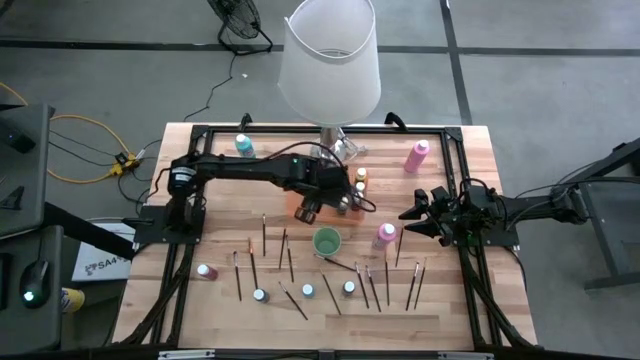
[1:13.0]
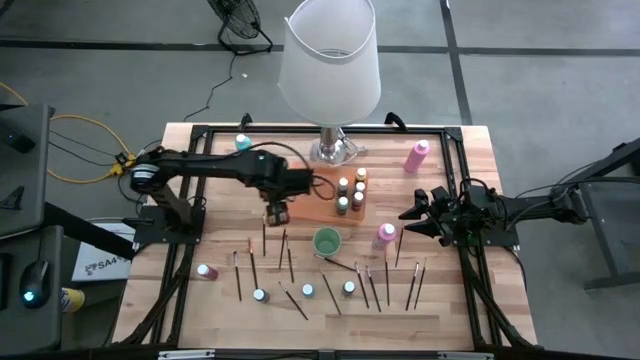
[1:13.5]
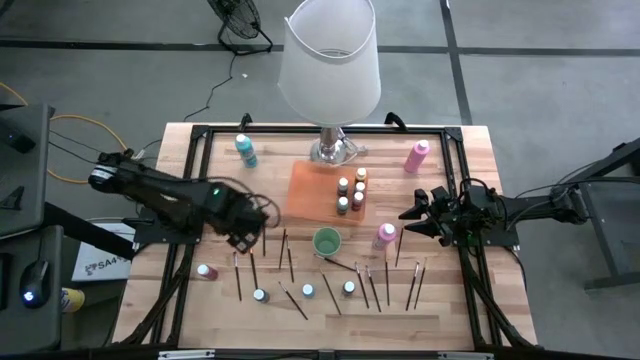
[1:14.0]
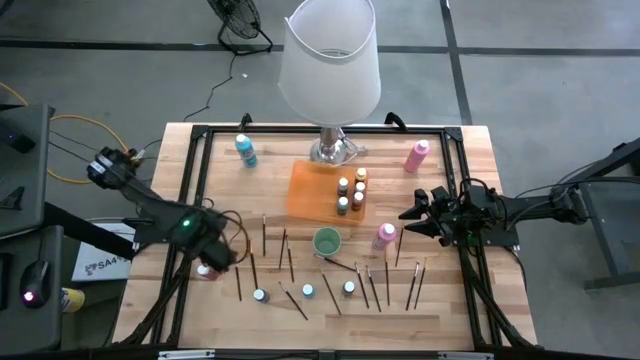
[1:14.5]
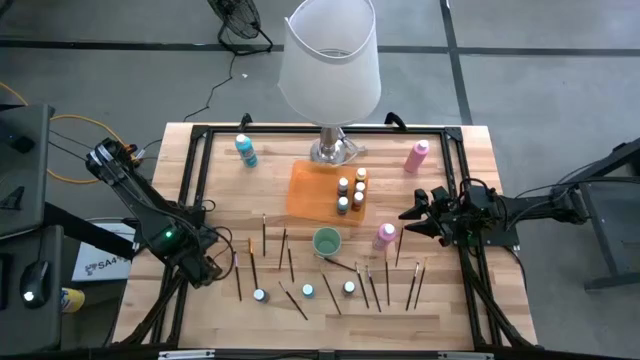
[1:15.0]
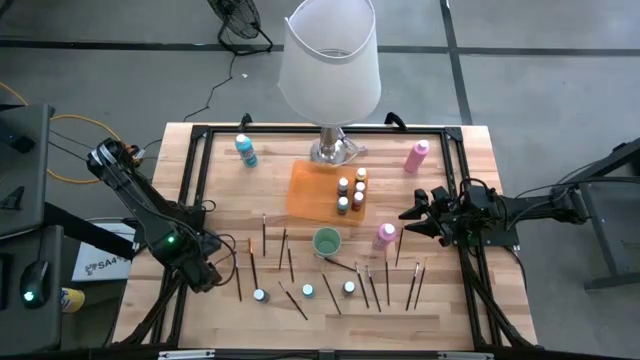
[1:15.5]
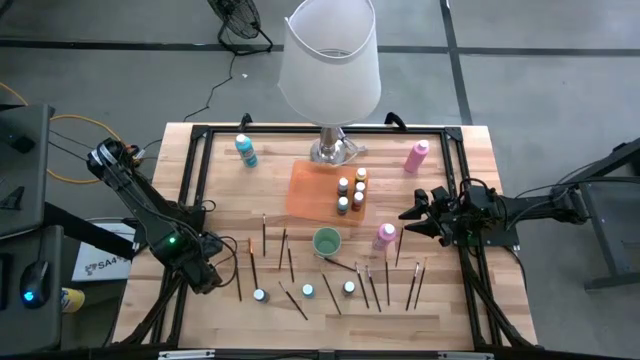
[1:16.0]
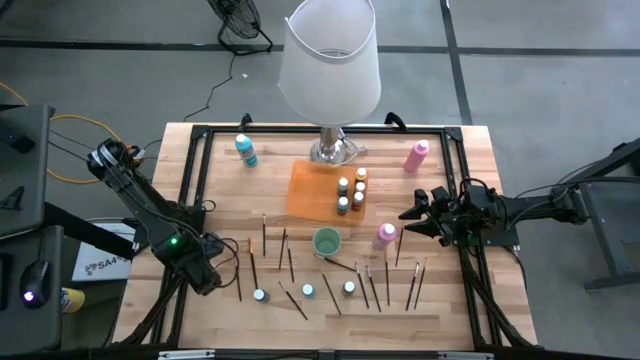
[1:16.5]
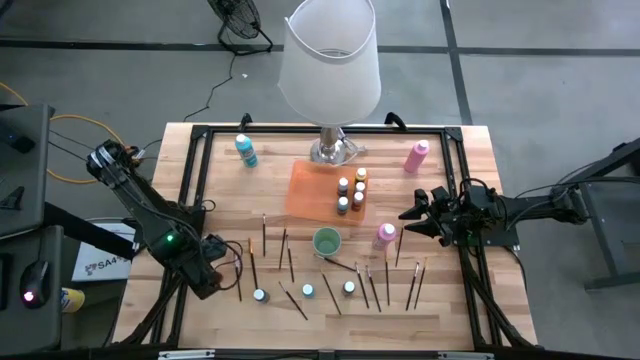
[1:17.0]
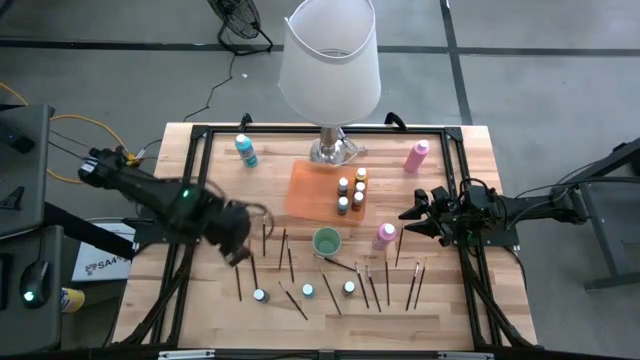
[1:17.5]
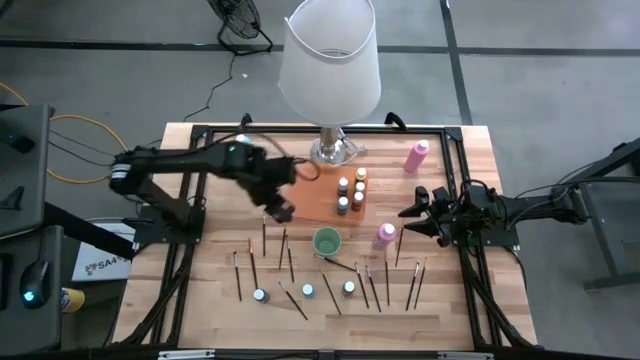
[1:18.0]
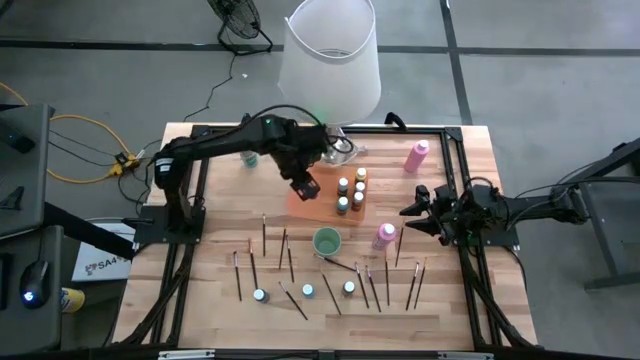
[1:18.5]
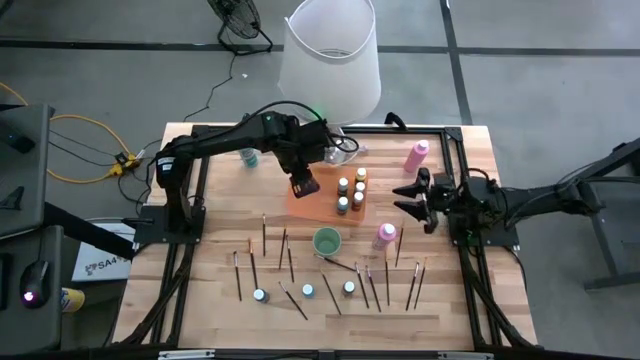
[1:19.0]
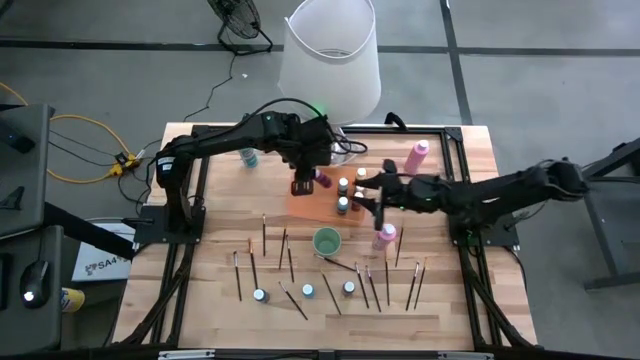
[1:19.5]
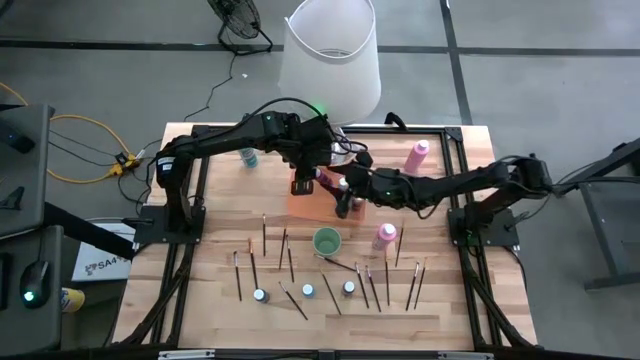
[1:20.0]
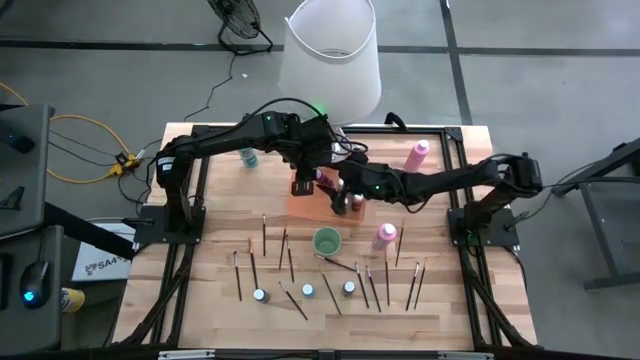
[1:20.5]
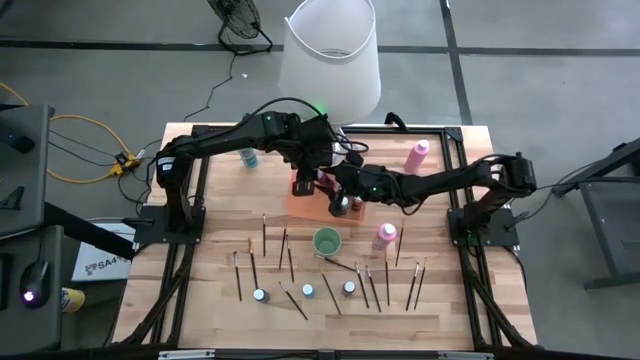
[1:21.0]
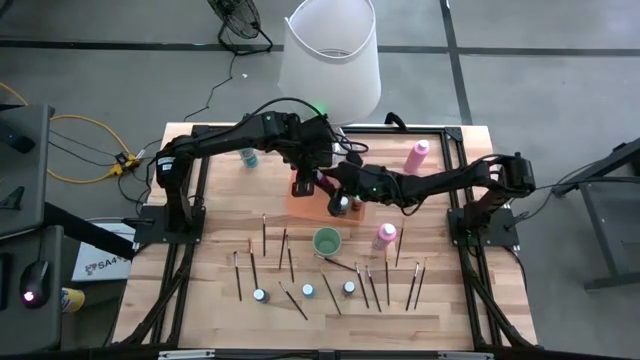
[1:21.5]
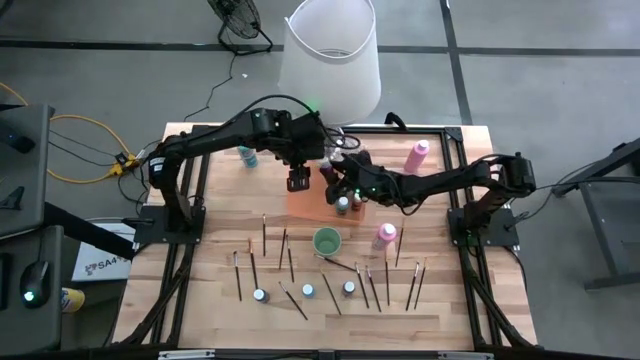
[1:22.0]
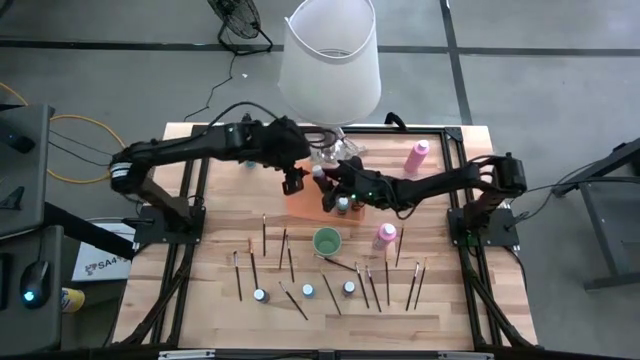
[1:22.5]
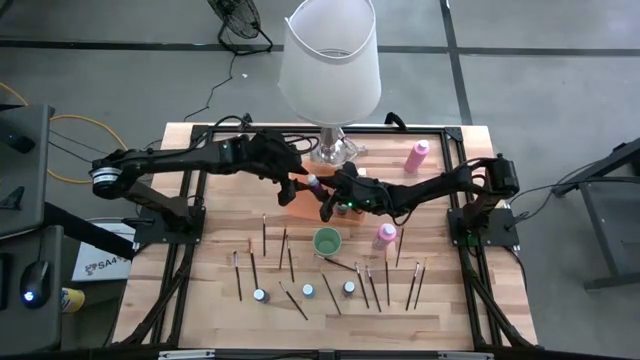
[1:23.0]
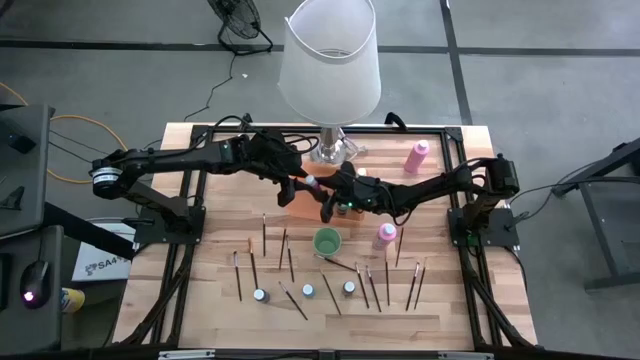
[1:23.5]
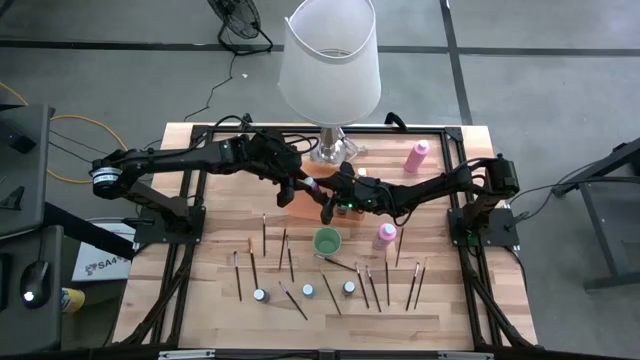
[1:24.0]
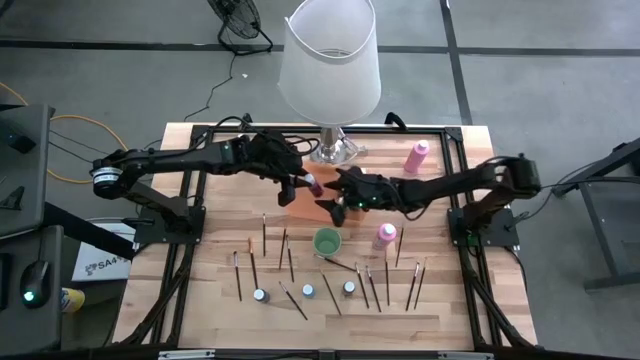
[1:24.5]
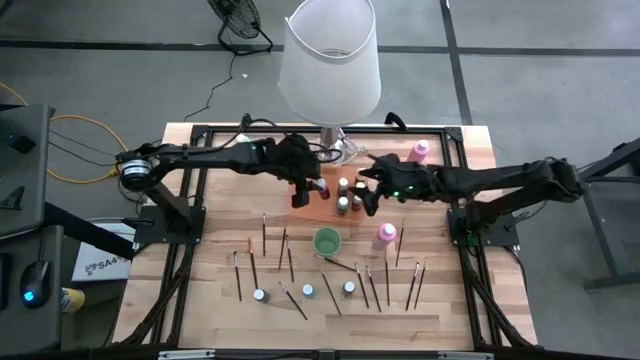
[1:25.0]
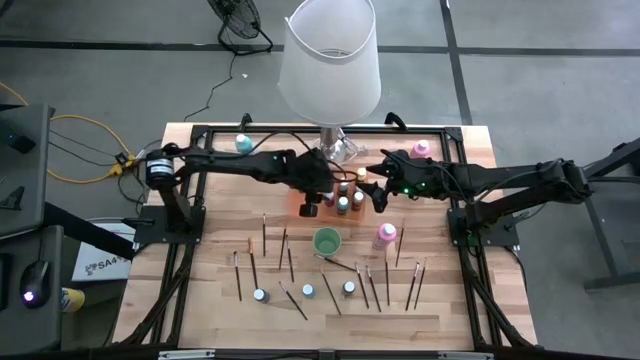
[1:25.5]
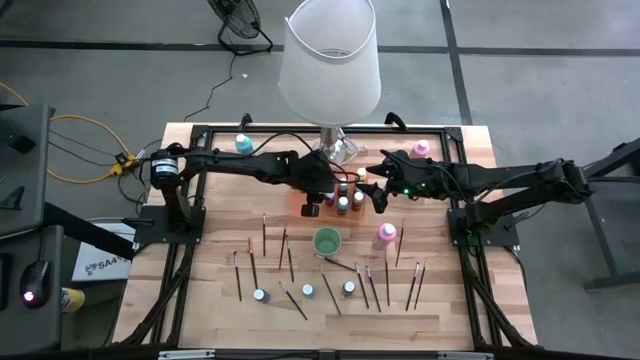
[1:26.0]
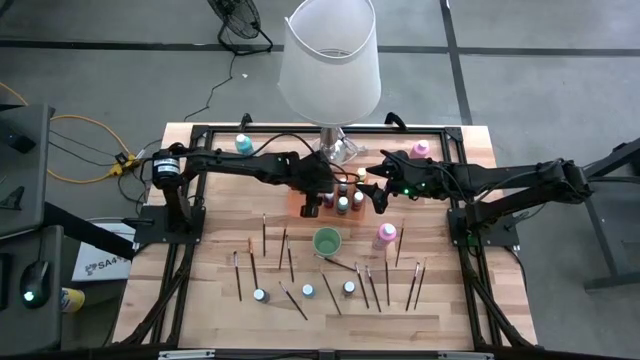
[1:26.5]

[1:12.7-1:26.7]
Task: Pick & Place Paint Supplies
Put the small dark pink paint bottle into the orange bin

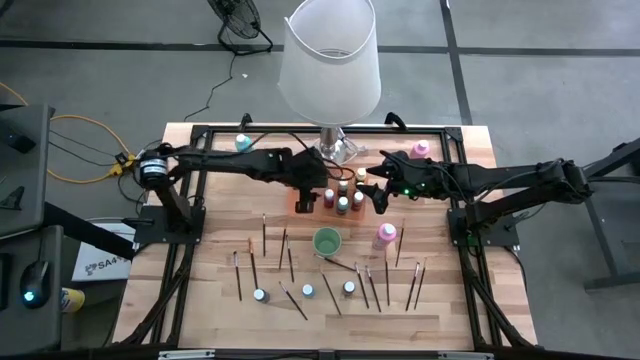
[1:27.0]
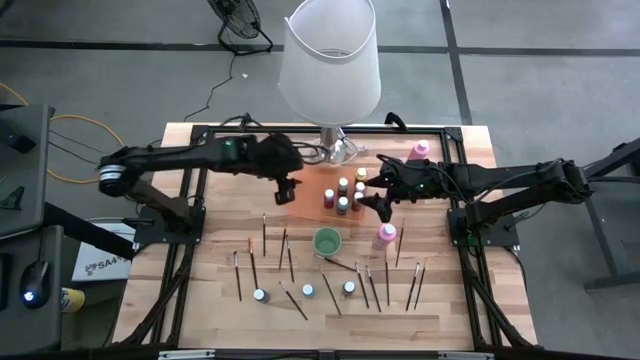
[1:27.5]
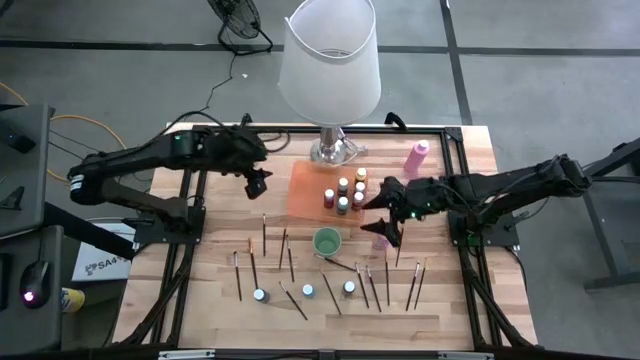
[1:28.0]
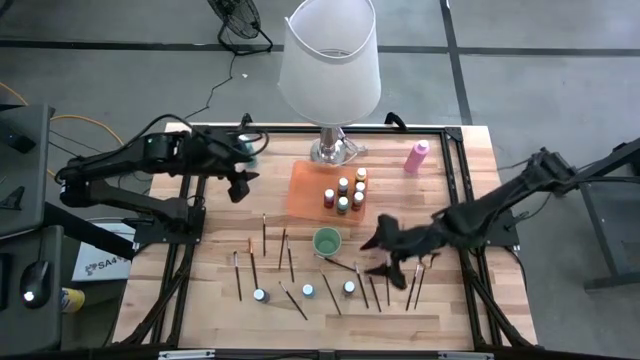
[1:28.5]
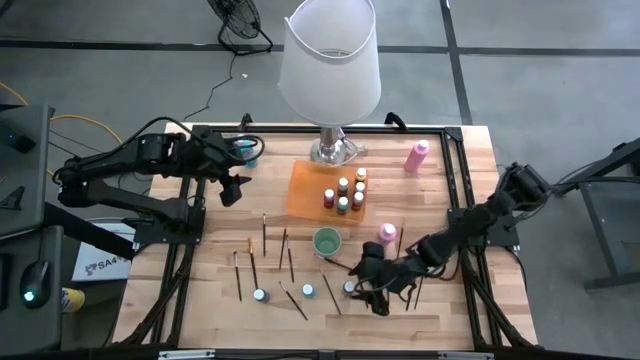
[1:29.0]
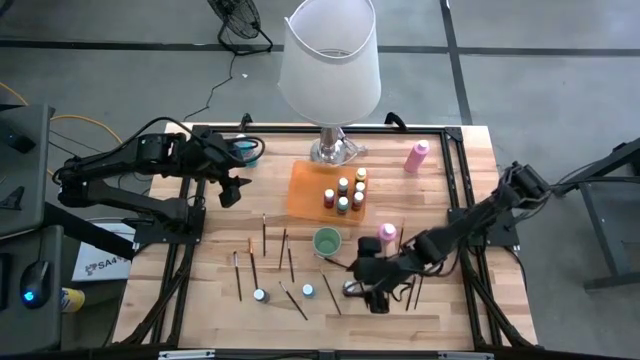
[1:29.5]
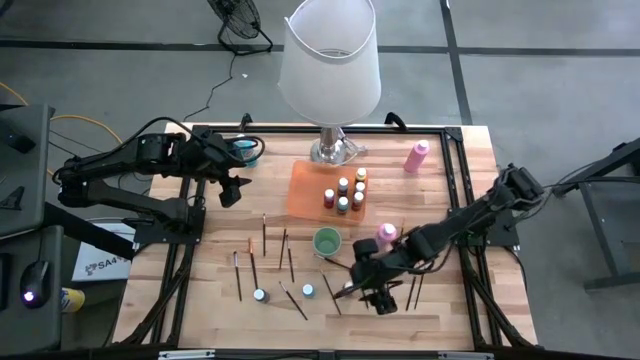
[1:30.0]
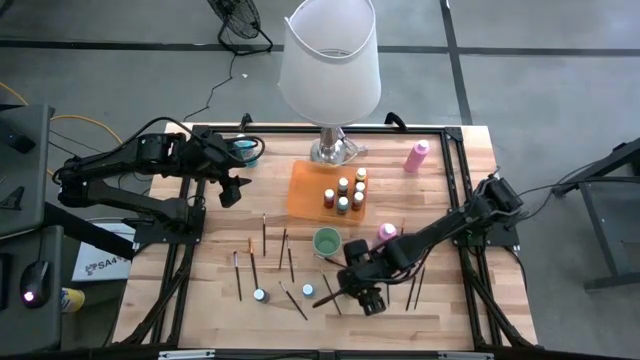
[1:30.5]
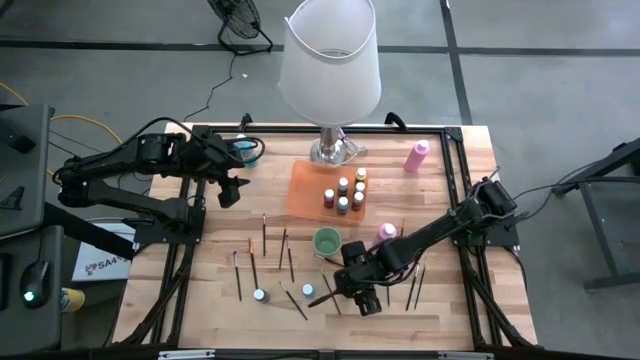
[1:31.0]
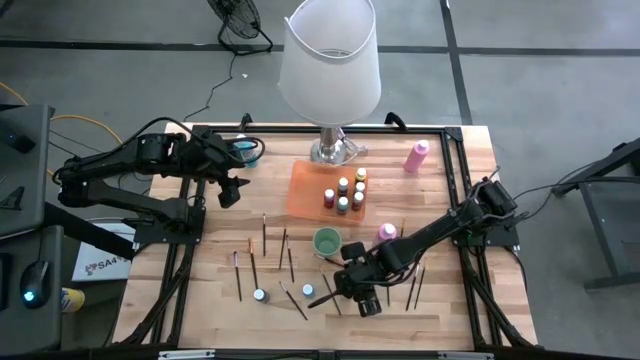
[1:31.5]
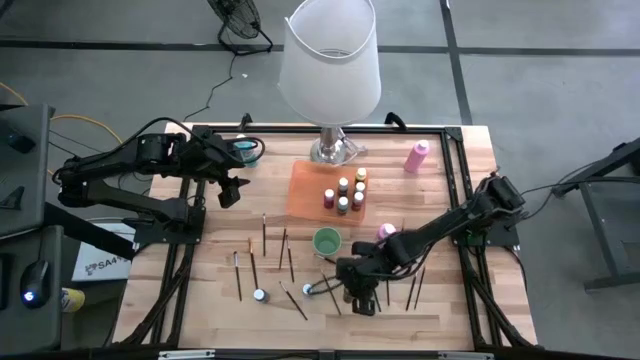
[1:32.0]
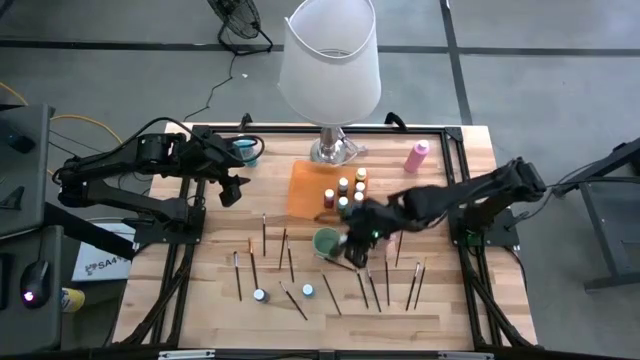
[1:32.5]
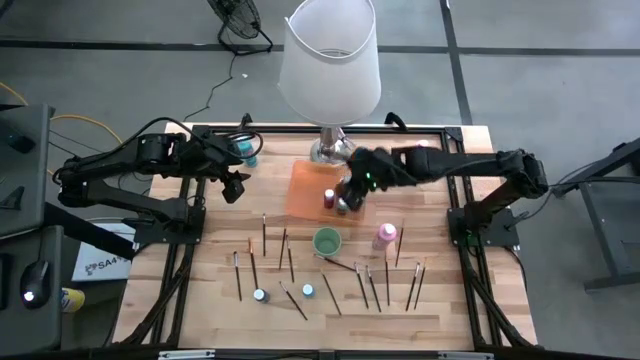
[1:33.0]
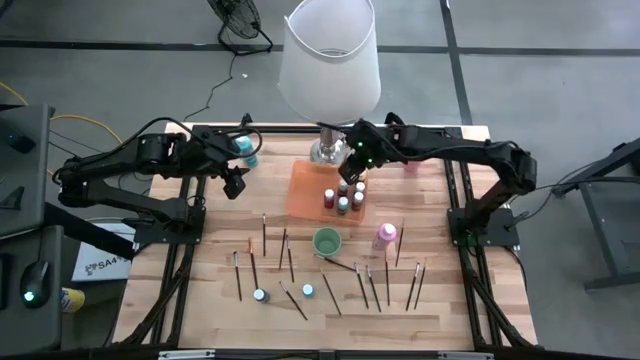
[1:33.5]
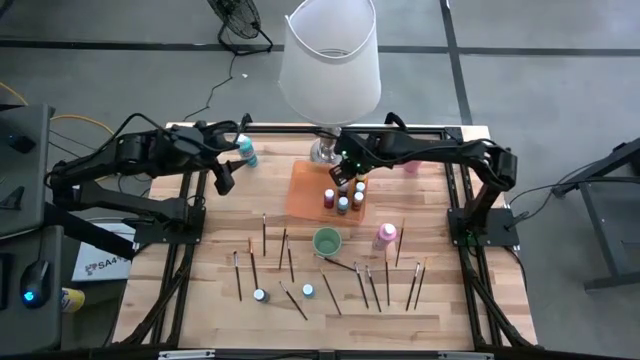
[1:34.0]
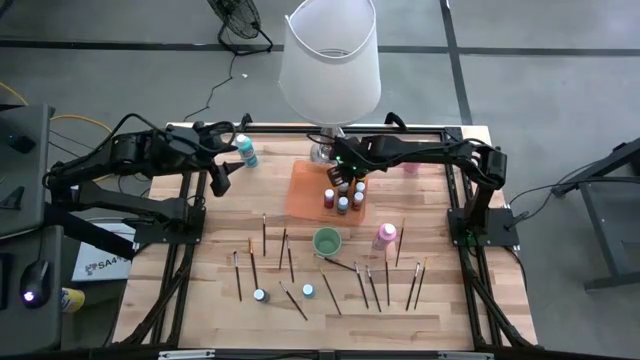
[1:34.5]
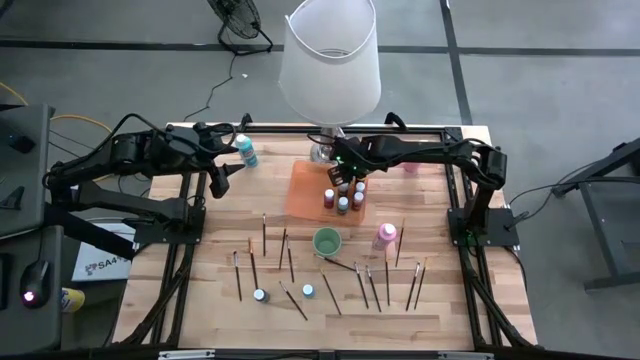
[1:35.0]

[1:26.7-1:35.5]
Put the small black paint bottle into the orange bin
